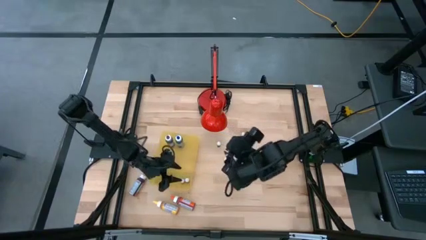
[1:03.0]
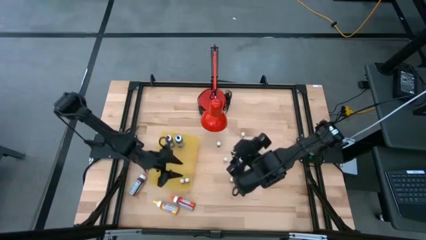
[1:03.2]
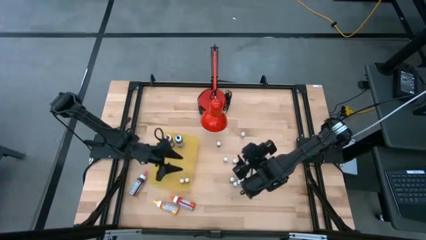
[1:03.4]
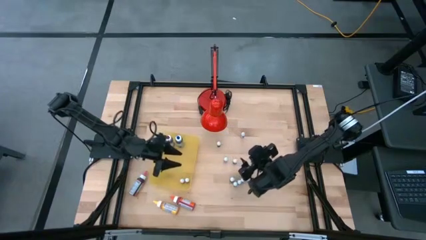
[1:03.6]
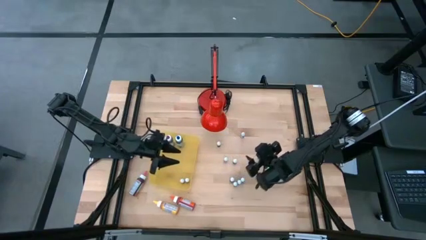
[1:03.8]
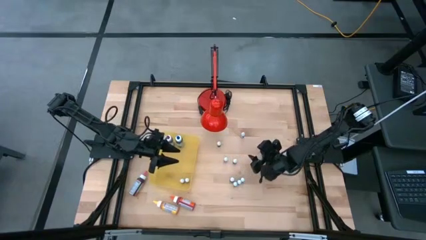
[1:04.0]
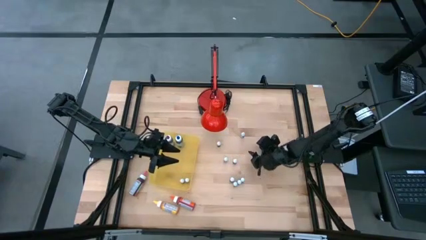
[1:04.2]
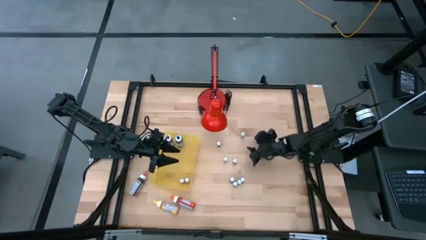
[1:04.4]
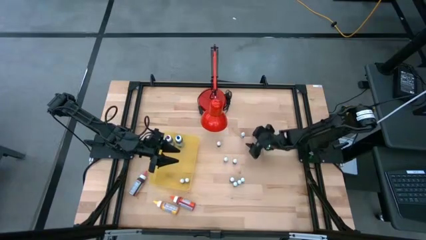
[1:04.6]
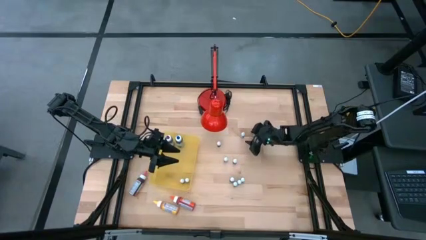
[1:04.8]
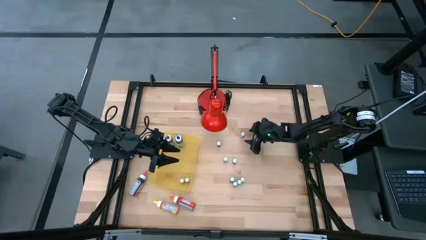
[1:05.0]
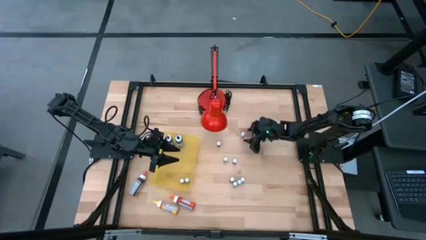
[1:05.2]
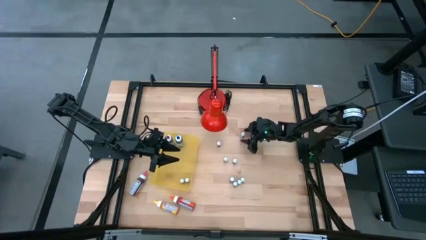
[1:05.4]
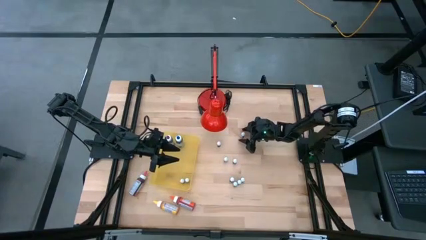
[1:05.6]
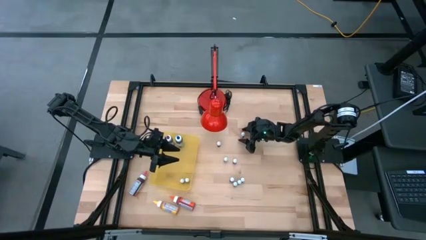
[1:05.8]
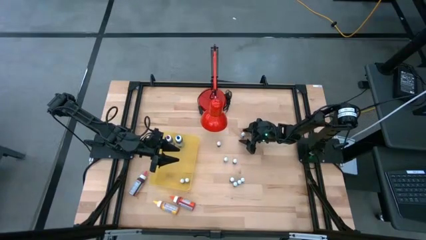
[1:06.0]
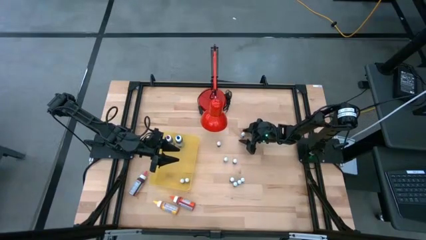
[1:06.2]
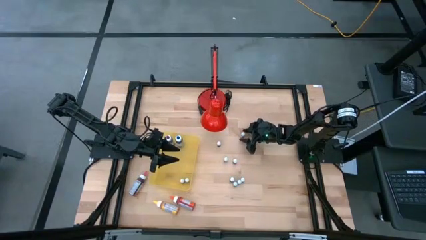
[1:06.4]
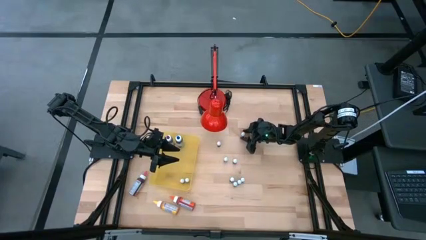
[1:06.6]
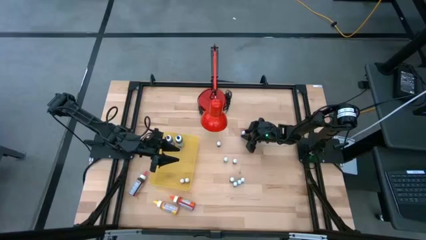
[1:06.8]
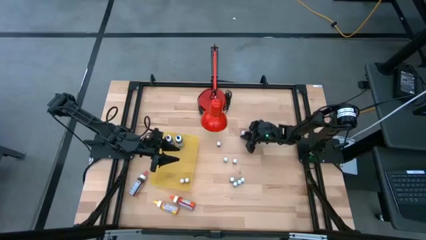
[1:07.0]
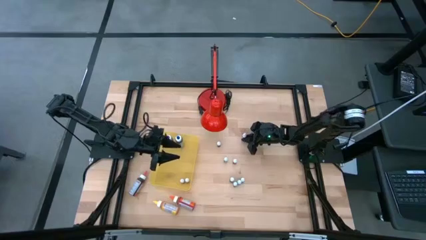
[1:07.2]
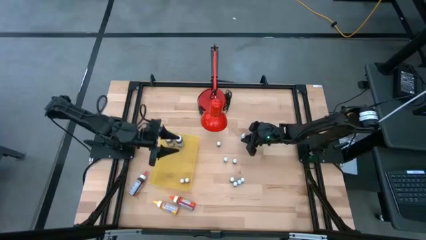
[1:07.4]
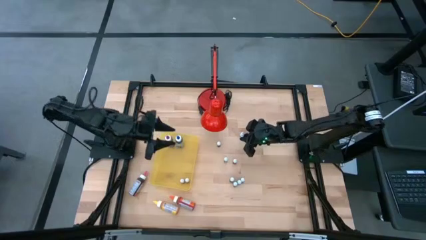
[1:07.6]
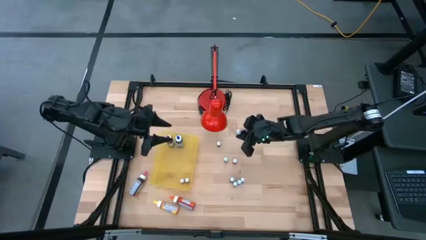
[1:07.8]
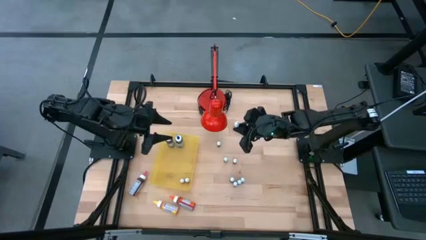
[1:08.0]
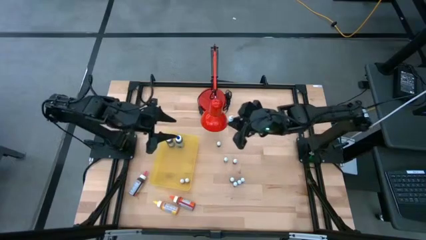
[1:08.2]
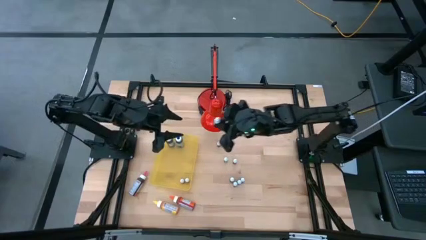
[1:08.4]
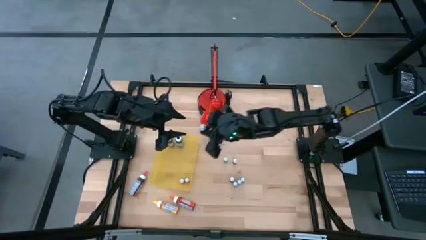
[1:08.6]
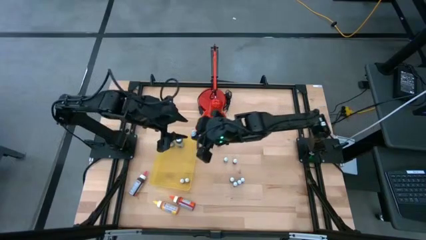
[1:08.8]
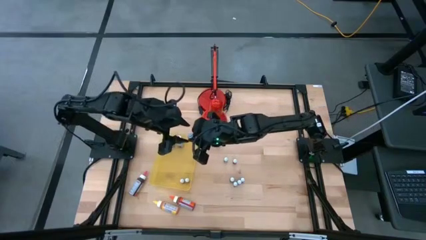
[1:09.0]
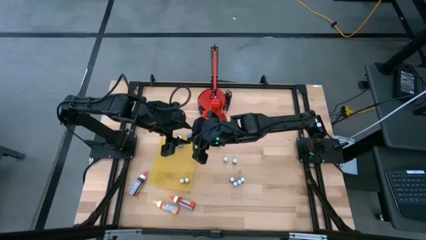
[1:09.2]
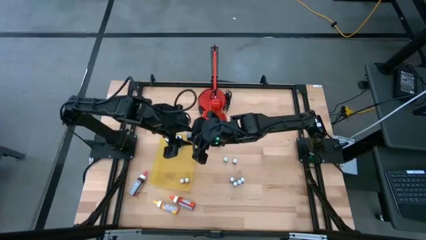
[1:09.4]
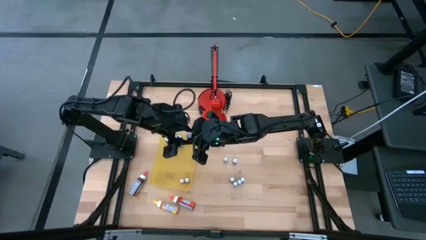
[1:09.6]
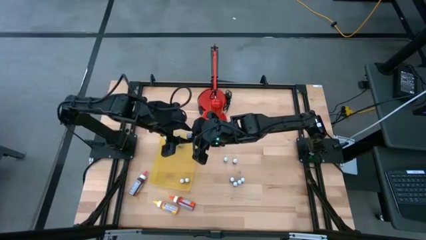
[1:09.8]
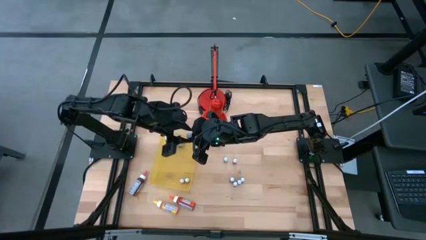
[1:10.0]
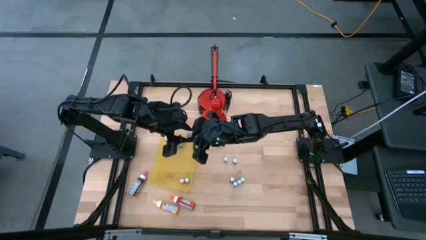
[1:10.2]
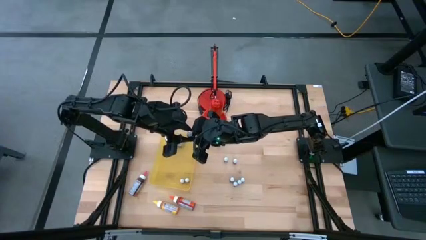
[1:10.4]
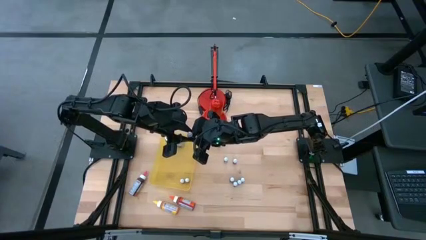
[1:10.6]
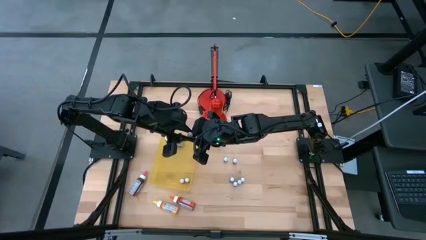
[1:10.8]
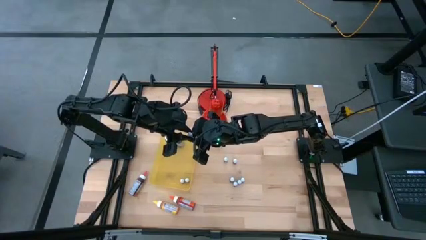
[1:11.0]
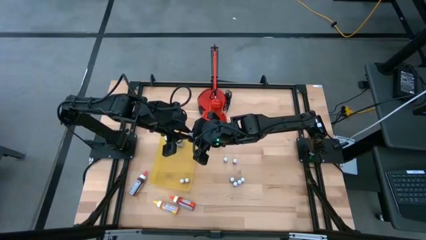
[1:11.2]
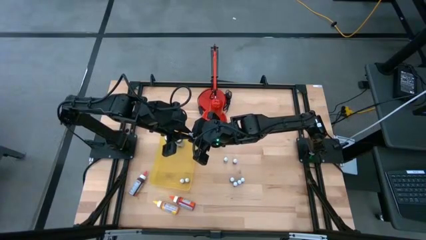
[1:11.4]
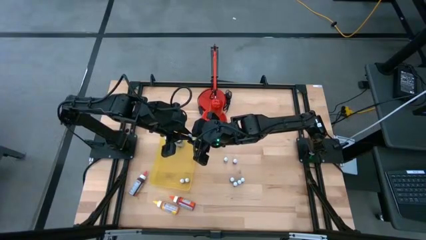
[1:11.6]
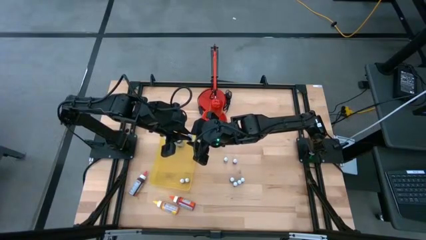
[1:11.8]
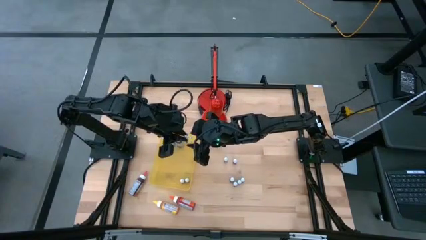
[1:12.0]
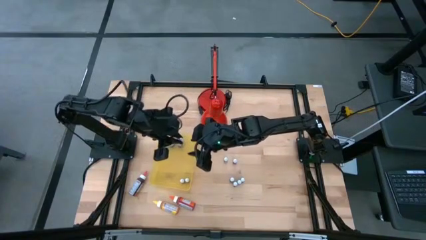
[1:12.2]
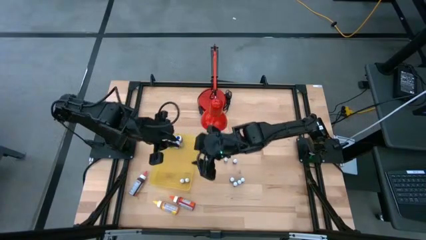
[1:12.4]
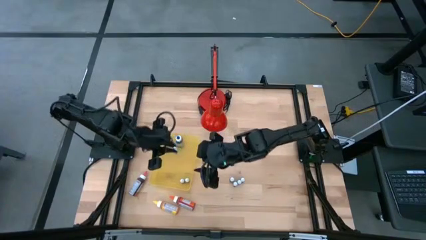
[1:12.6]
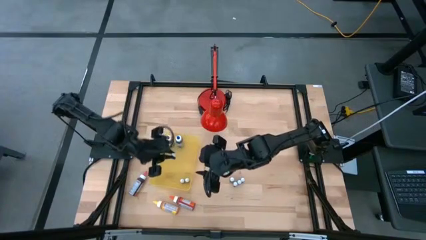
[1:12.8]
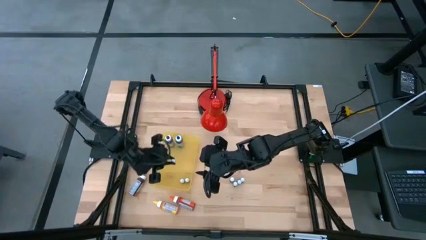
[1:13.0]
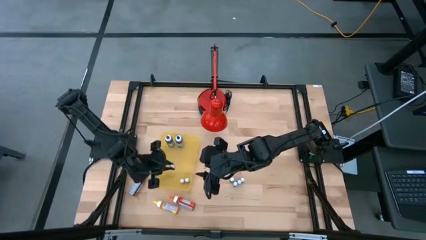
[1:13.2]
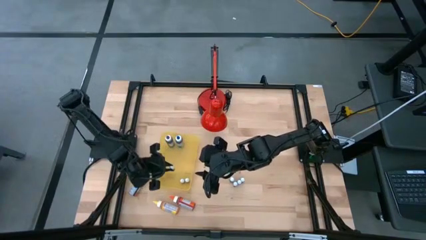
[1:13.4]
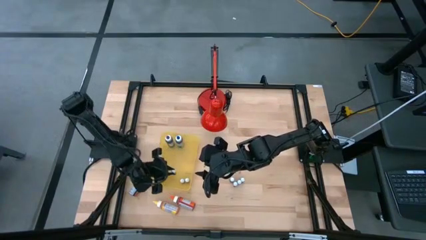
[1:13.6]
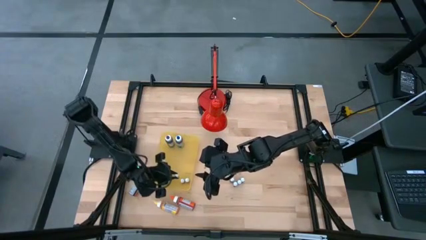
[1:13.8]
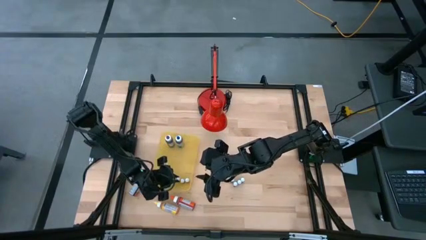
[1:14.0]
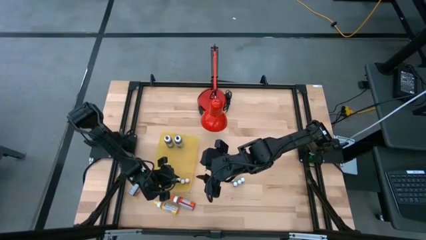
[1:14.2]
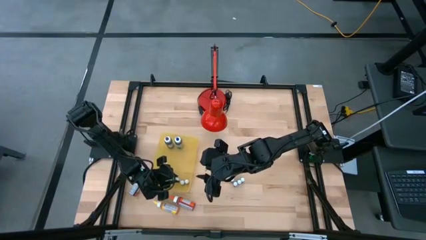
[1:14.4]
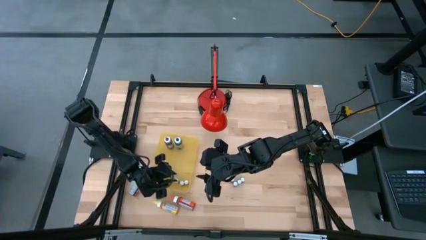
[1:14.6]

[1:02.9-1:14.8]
Task: Pick & Place food coloring
Put the small brown food coloring bottle into the yellow bin

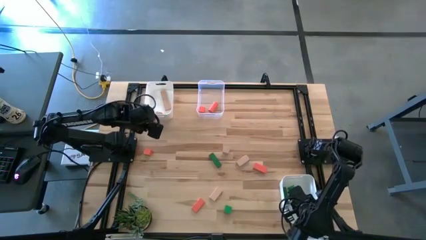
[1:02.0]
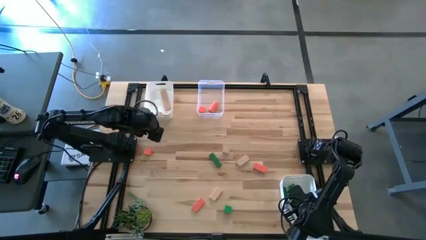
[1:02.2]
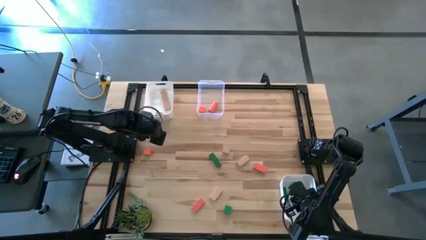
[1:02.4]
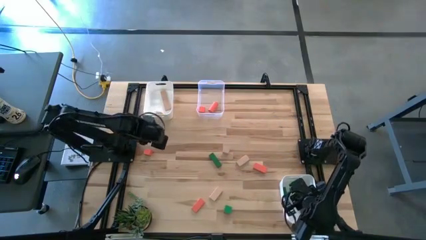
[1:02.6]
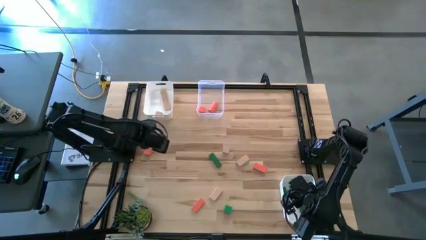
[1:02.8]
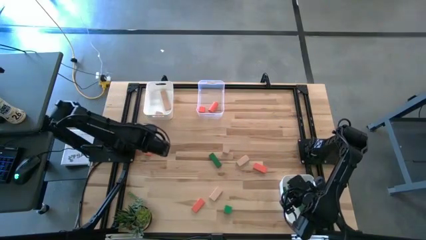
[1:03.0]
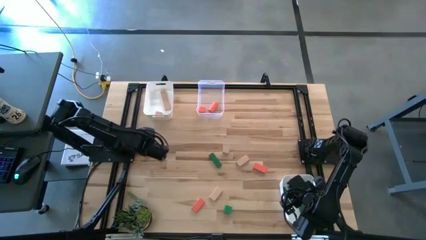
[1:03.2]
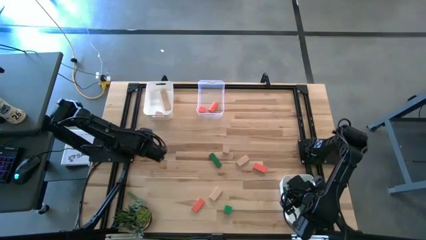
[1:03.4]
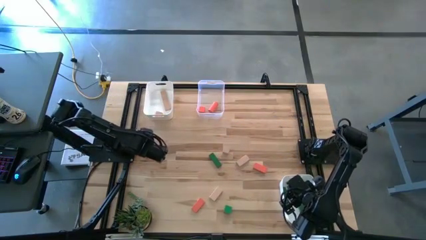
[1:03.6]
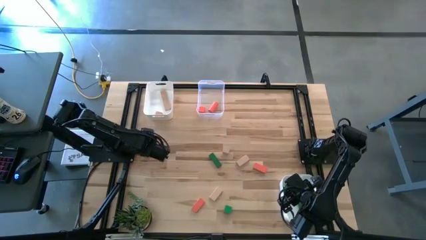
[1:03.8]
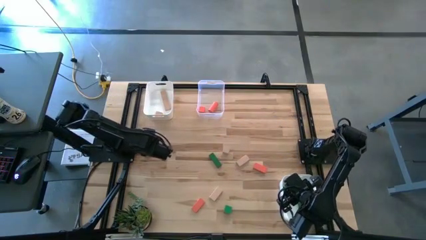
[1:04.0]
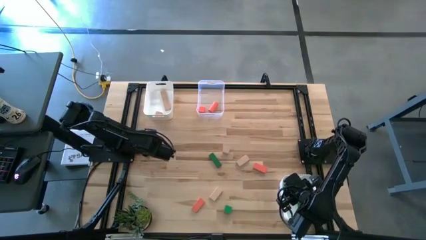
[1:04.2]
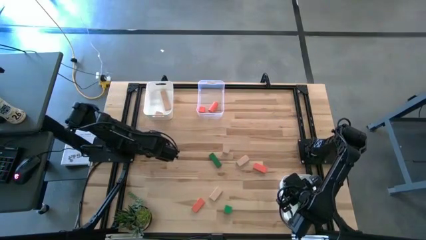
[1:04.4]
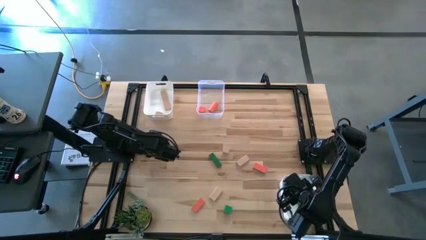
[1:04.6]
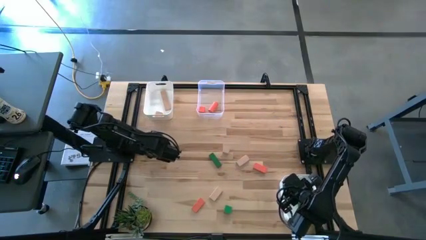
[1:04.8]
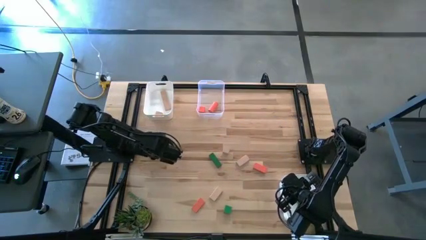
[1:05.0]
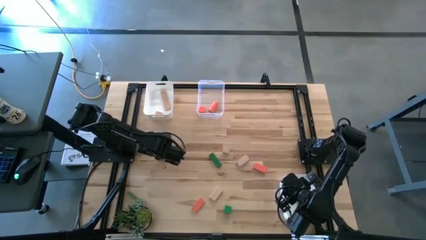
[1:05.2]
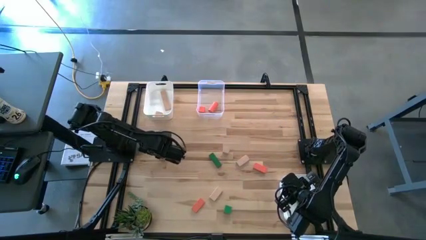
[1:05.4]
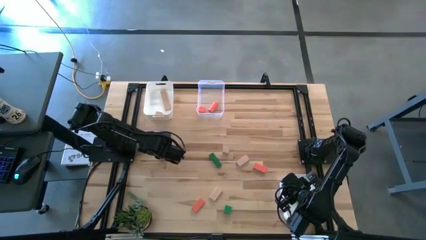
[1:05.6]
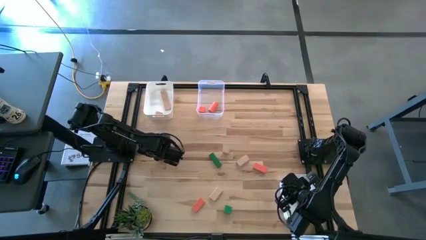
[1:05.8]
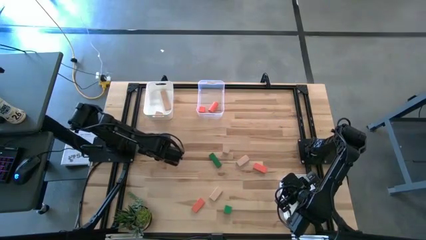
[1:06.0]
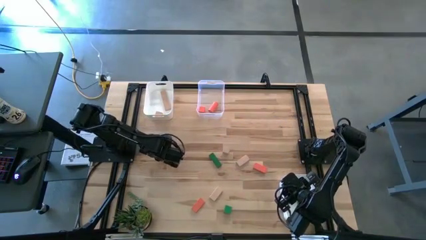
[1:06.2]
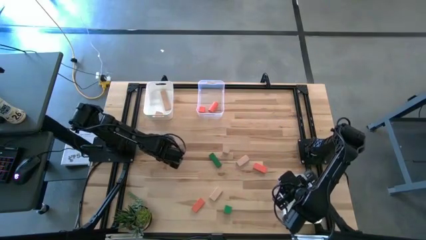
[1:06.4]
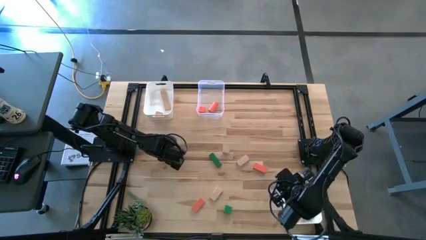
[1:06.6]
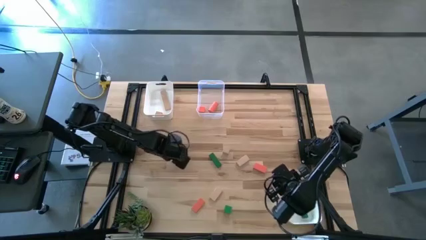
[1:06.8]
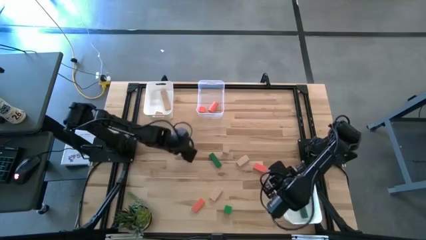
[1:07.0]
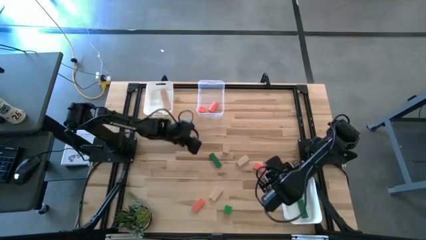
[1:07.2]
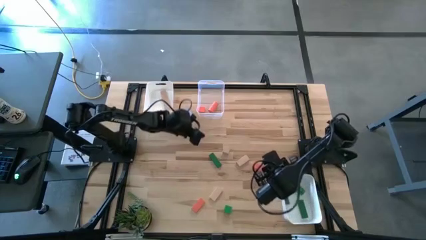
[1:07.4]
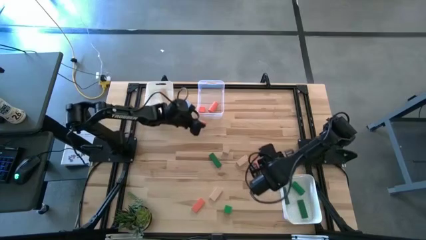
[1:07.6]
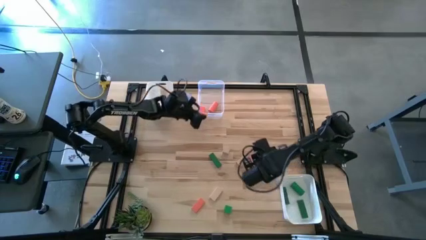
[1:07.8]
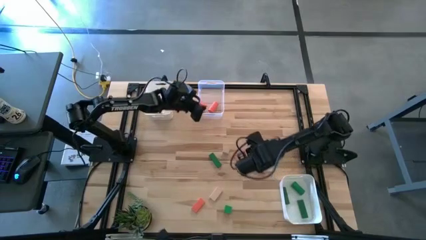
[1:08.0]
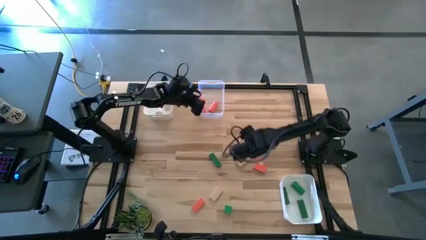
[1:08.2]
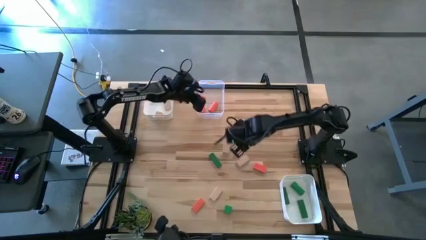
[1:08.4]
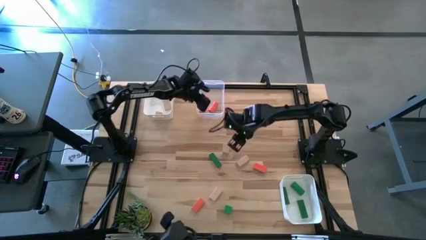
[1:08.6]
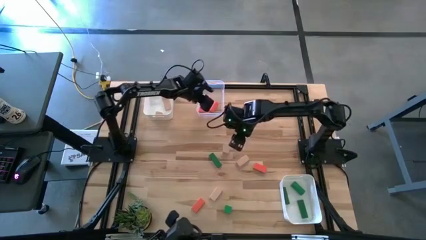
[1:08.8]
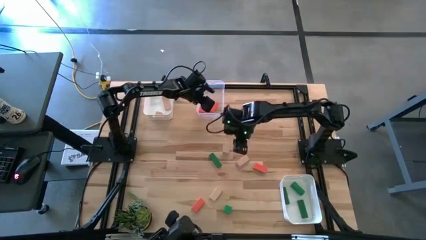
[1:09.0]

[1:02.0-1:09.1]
Task: Sort & place blocks by color
Put the orange block into the transparent bin
